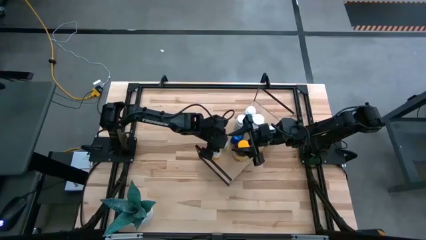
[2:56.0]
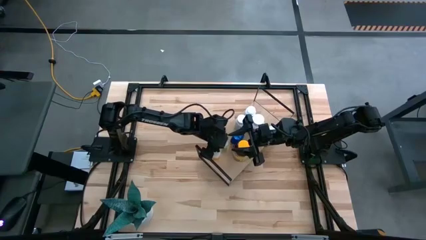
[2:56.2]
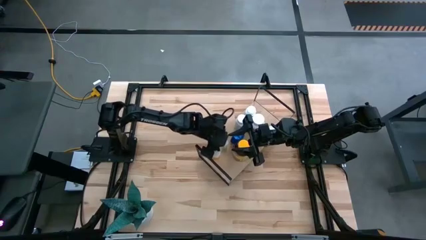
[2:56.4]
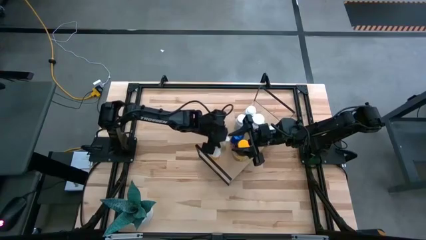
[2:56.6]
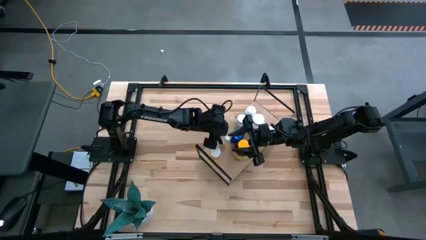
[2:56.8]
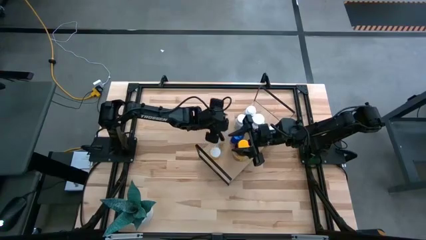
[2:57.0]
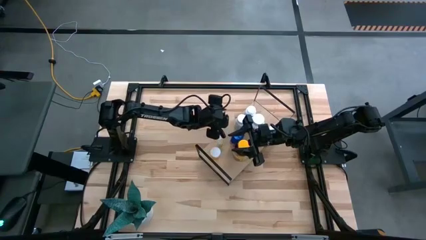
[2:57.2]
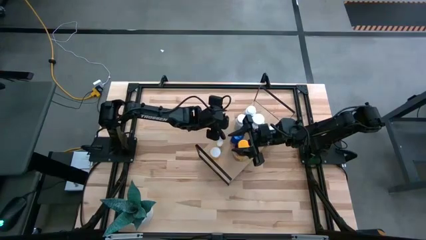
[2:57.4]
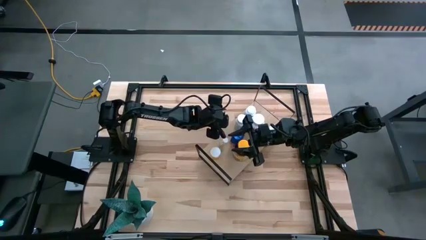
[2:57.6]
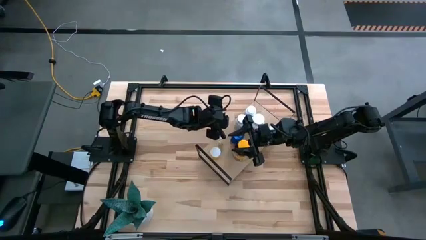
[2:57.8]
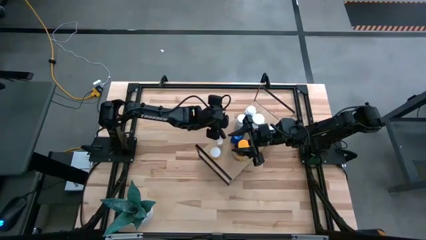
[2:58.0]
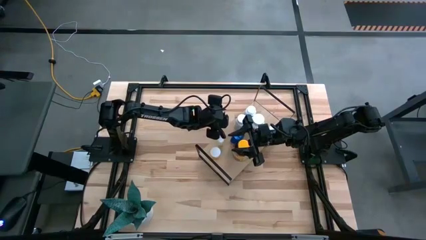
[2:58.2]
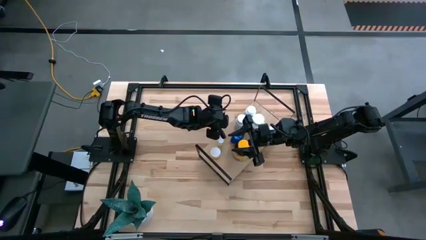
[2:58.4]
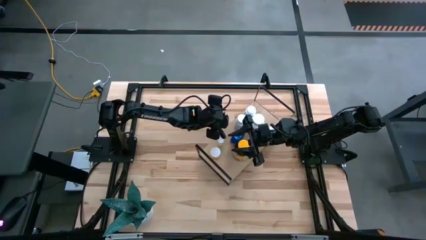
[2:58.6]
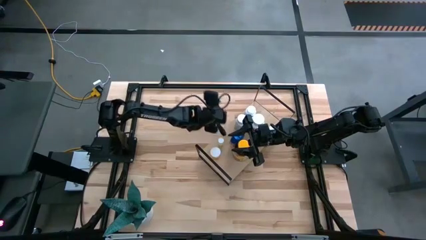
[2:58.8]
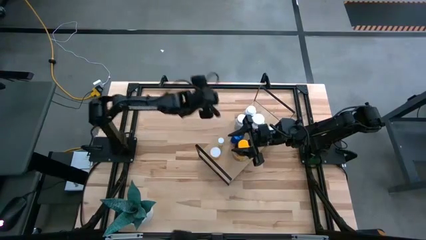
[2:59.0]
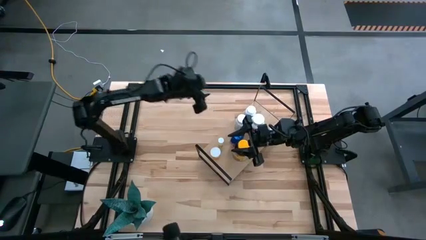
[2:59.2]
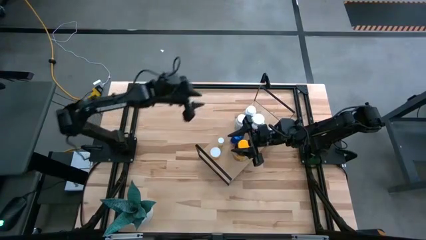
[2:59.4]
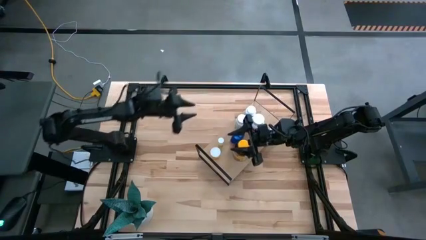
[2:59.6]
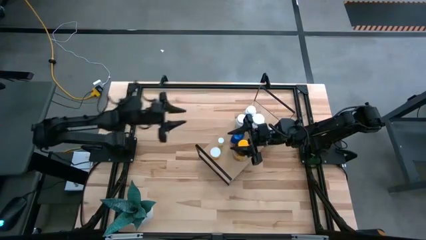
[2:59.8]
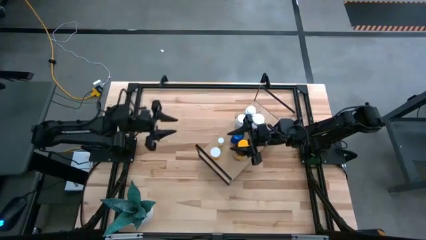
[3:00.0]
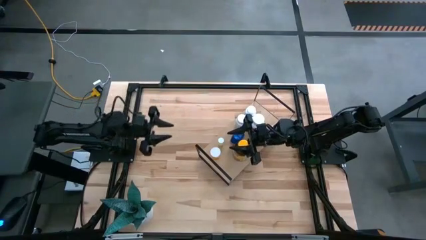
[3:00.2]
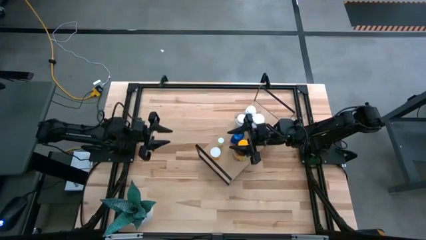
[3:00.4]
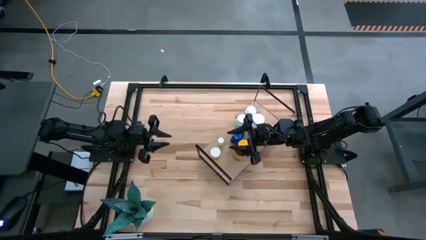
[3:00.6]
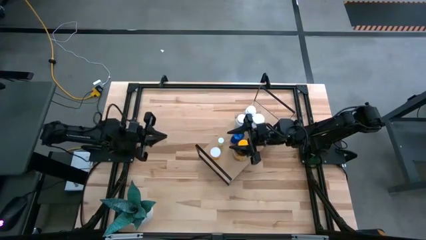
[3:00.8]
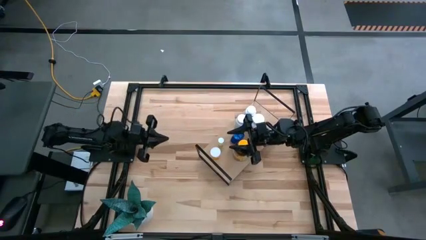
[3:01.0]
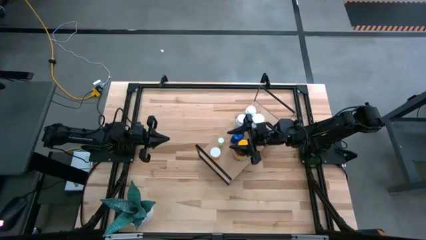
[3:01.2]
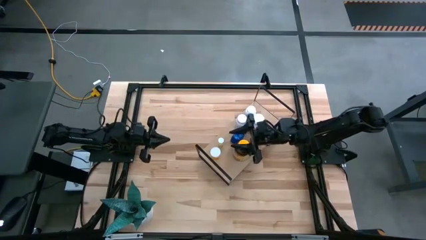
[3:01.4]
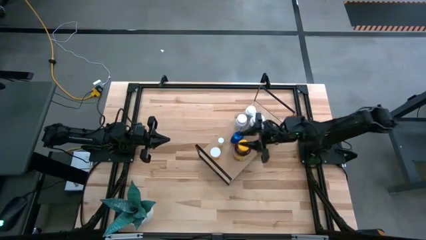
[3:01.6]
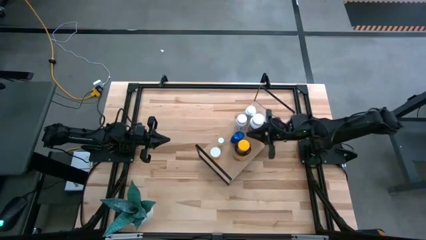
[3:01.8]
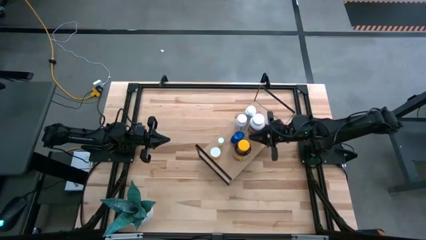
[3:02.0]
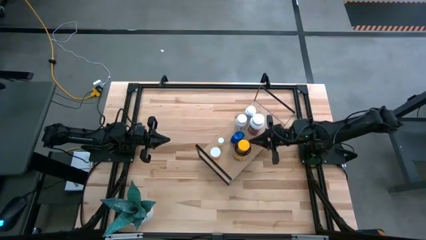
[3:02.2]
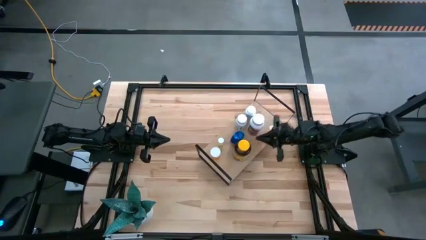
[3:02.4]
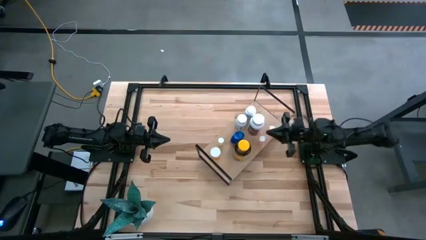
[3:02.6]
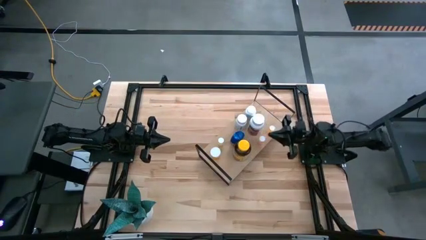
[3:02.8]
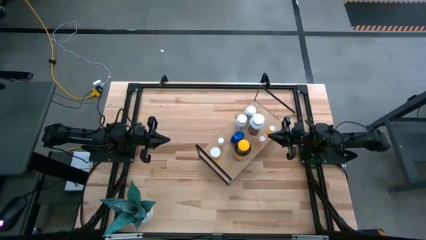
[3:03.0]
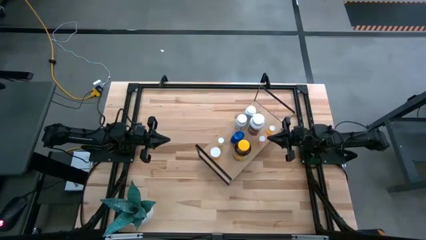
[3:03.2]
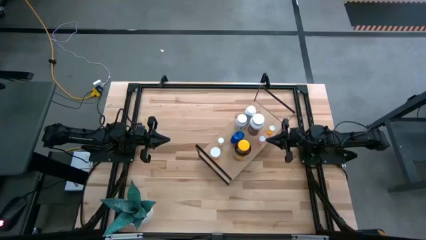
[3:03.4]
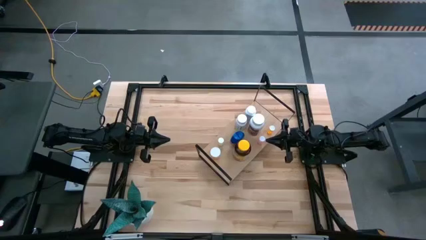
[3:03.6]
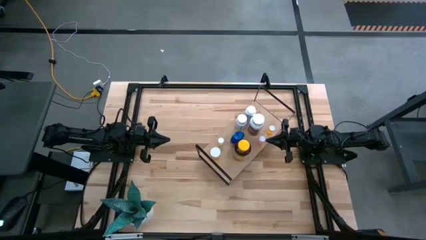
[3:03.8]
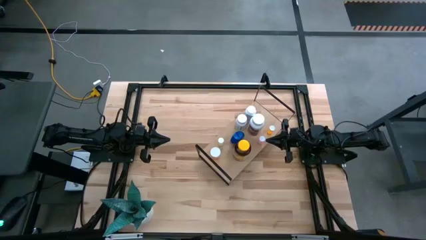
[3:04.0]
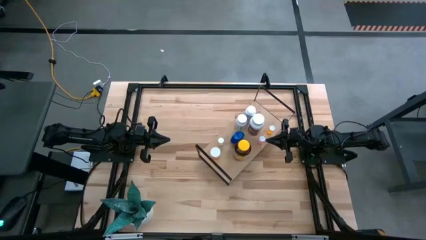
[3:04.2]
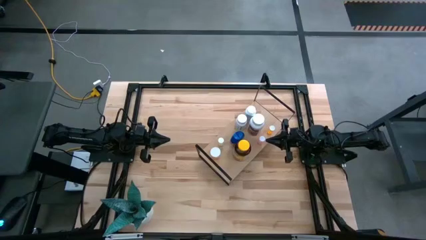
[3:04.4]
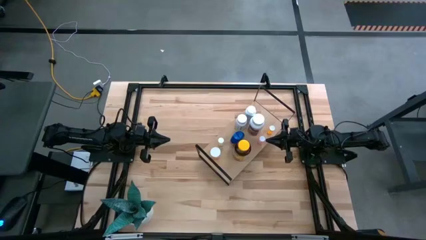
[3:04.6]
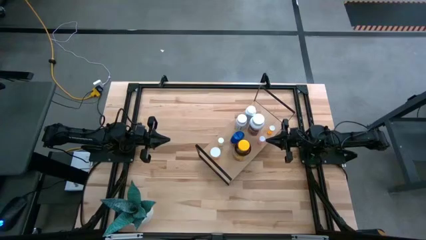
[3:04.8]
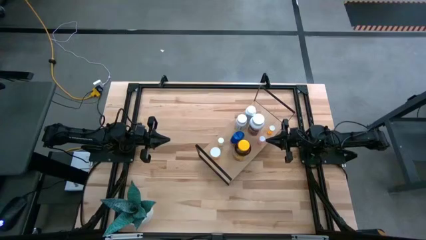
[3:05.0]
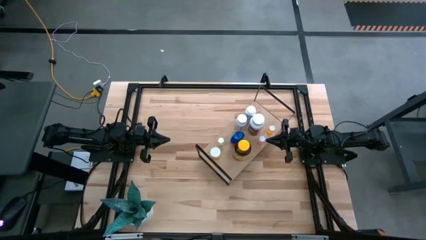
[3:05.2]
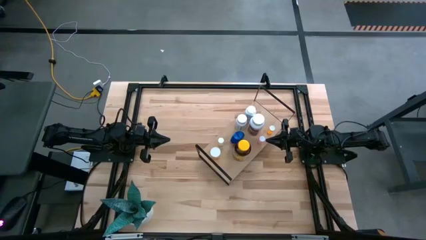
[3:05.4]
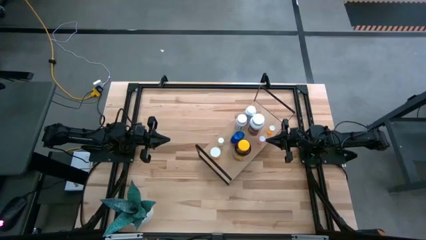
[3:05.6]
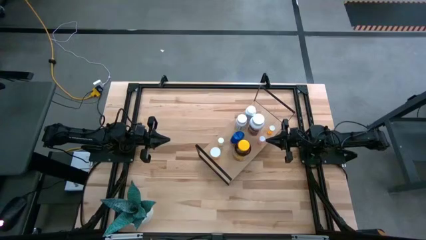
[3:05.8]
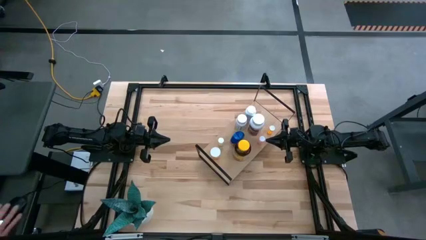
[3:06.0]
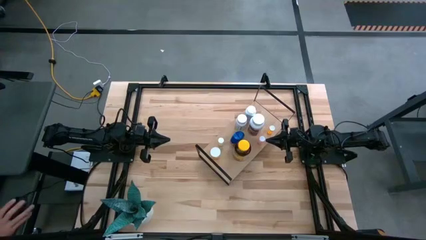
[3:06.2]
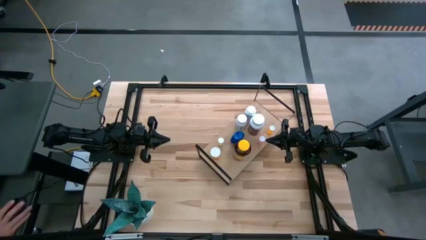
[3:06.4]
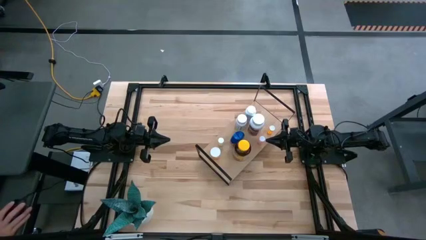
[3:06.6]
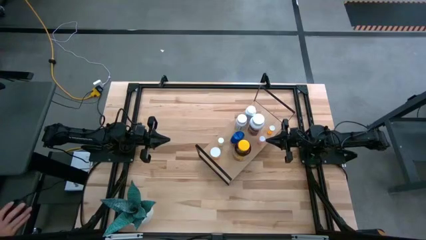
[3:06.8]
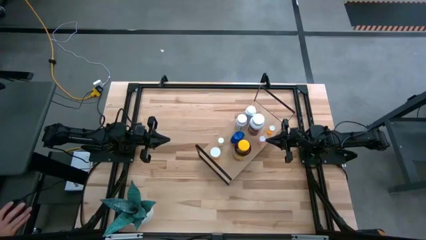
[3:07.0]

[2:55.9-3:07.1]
Task: Pick and place medicine bottles onto shelf by color
Return to Home Position

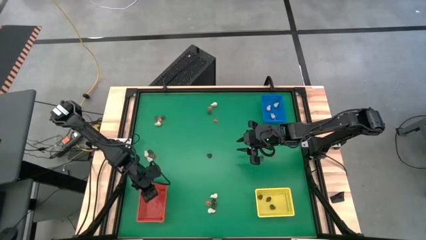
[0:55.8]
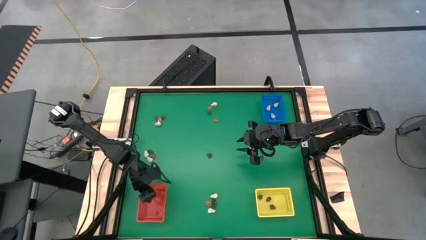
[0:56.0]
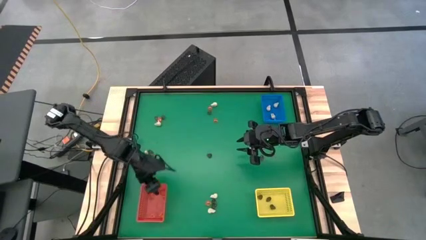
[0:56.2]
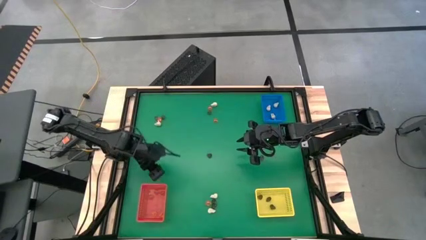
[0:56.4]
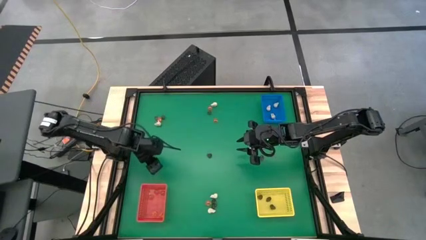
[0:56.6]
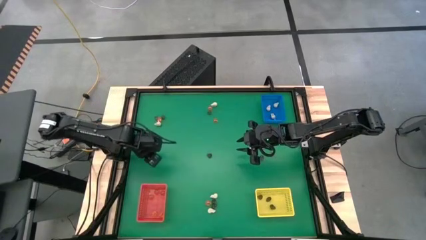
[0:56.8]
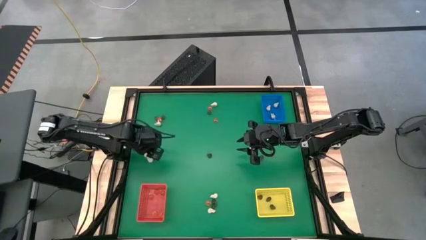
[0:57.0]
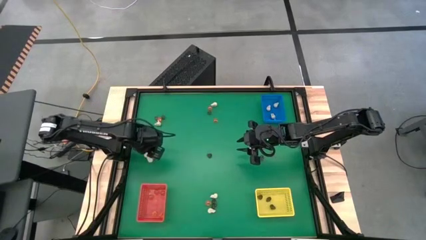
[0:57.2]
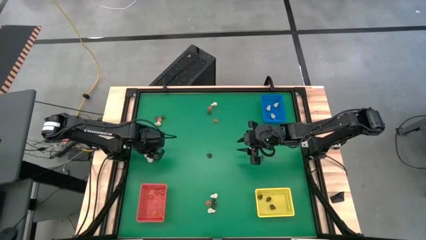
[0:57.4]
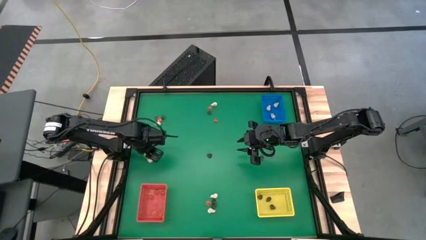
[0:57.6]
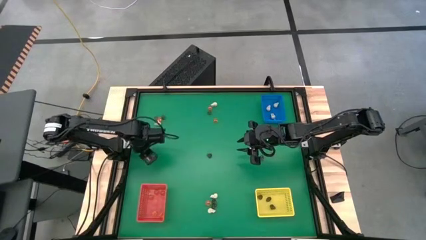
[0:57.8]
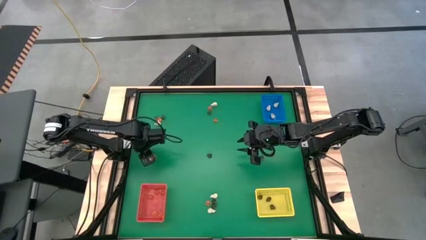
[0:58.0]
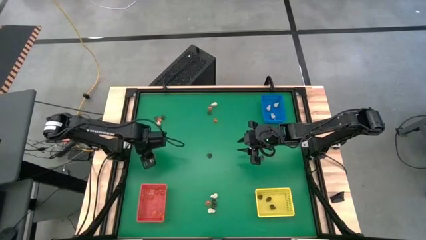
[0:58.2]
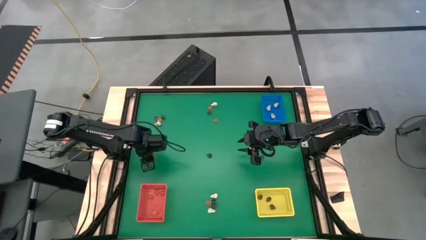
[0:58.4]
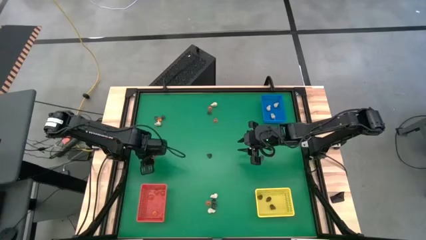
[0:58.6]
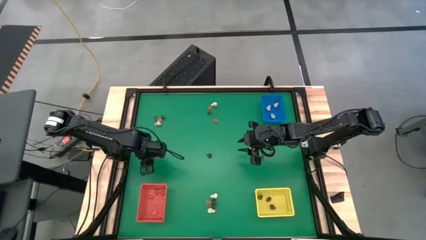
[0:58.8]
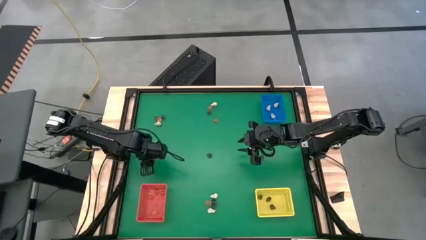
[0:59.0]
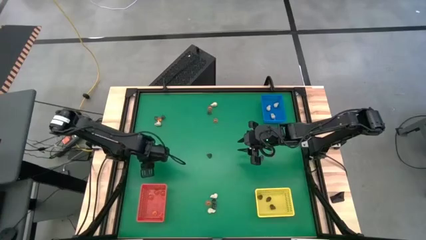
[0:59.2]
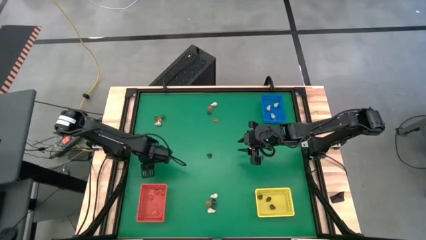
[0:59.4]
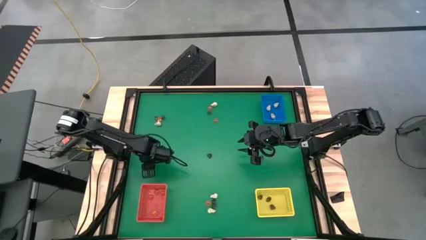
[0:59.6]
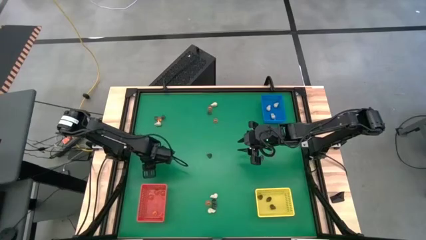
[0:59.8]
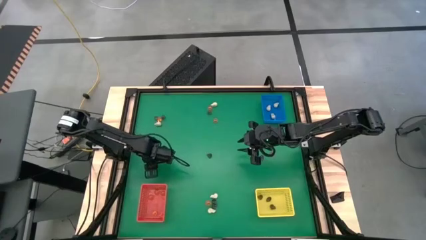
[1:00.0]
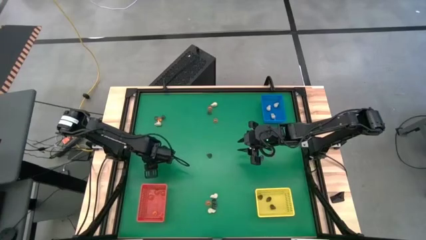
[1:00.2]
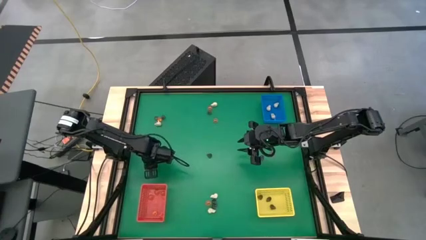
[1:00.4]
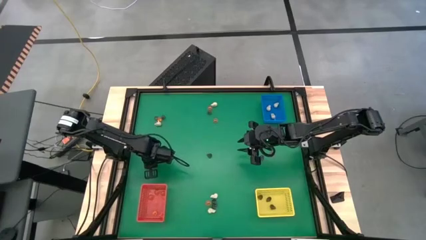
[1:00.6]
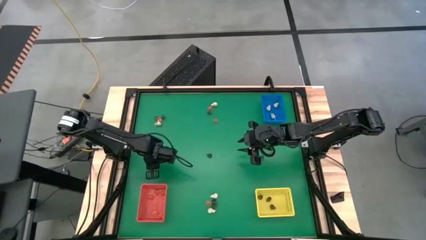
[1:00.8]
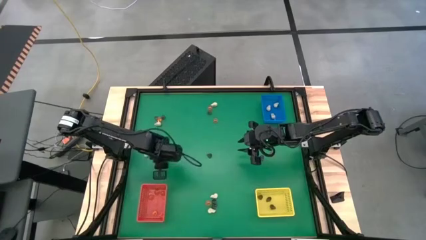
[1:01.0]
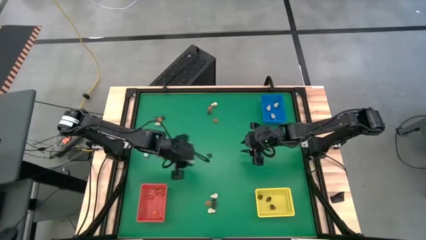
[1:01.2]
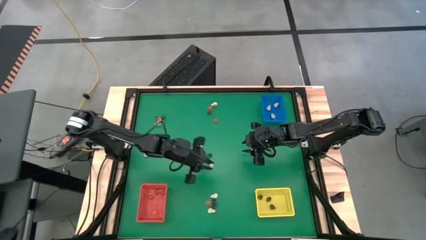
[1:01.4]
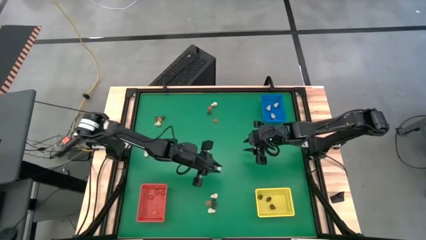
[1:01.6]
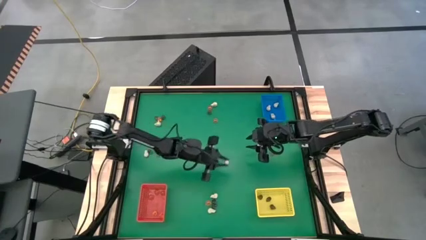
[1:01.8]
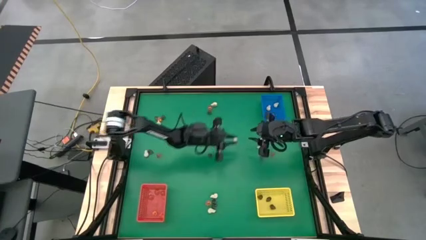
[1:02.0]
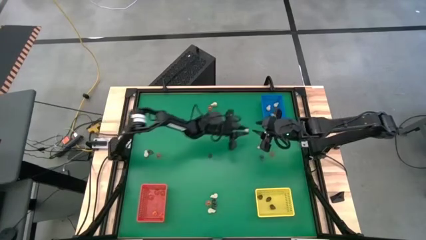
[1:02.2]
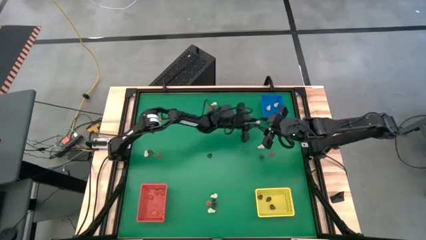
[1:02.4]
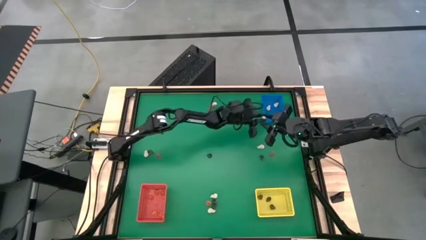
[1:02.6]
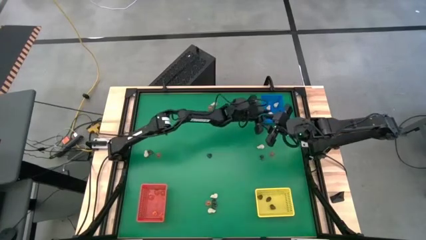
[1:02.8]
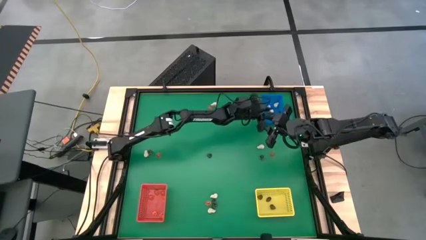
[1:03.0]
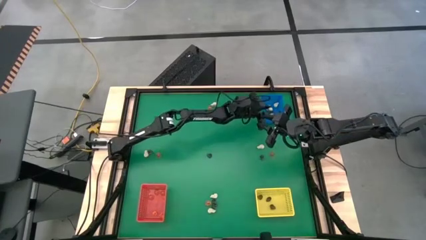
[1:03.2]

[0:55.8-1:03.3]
Task: Sort Halloween decoration
Put the white skull toy into the blue bin
